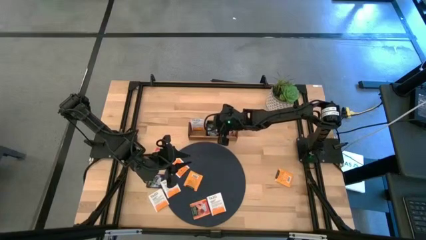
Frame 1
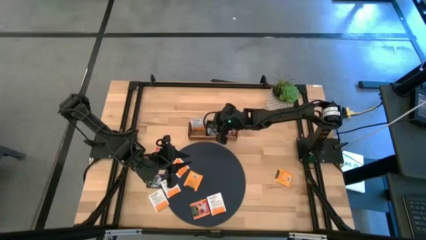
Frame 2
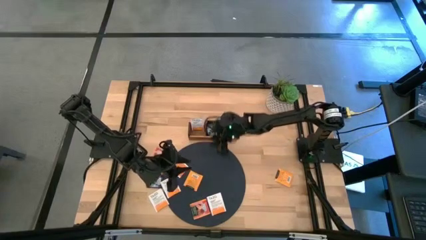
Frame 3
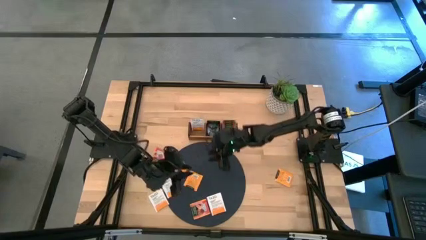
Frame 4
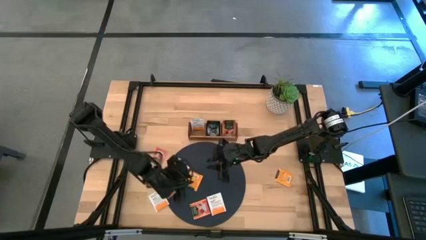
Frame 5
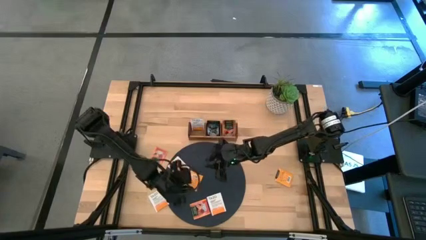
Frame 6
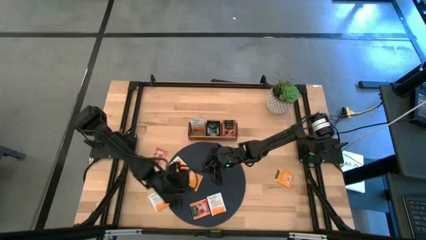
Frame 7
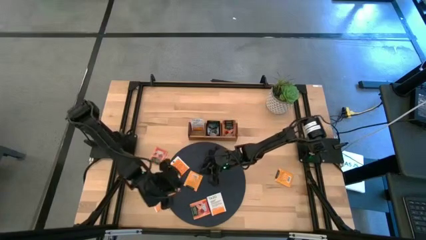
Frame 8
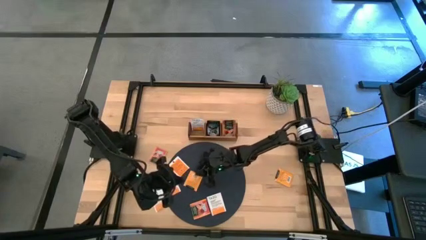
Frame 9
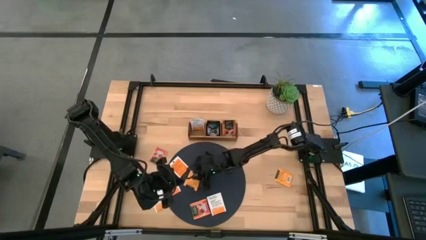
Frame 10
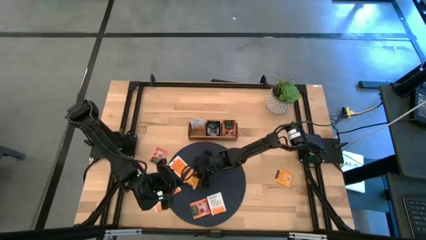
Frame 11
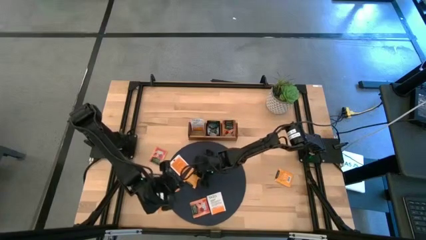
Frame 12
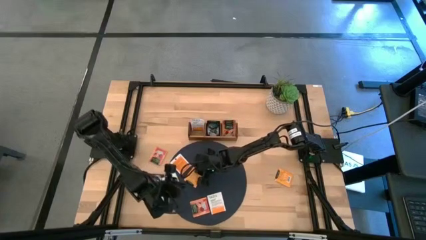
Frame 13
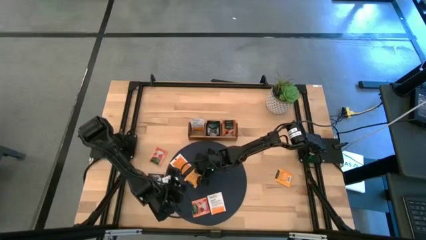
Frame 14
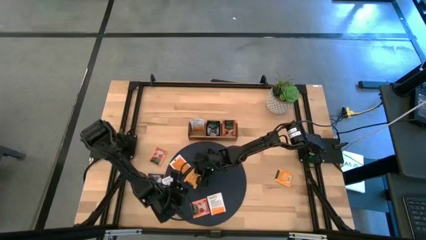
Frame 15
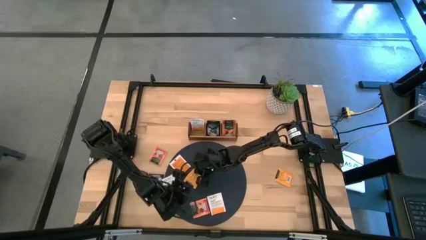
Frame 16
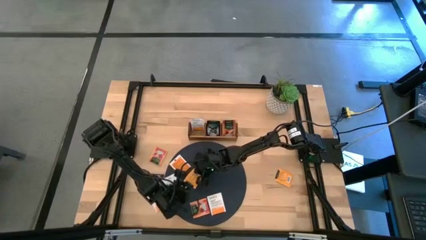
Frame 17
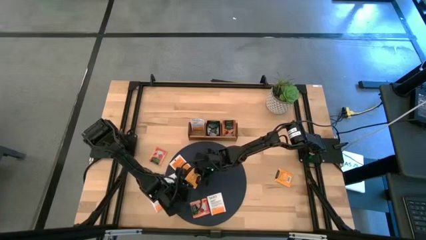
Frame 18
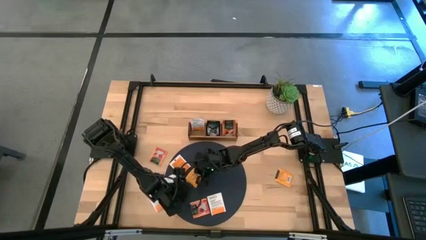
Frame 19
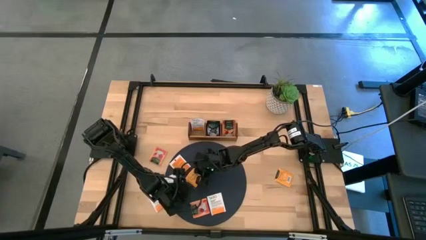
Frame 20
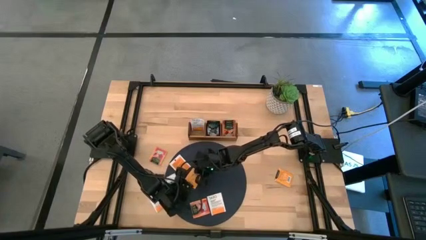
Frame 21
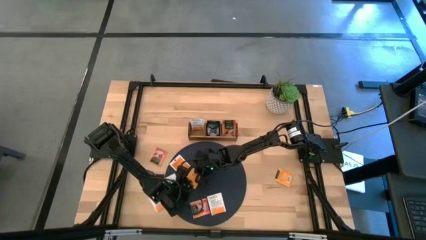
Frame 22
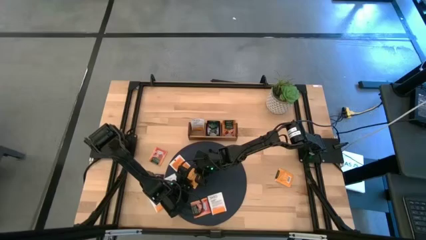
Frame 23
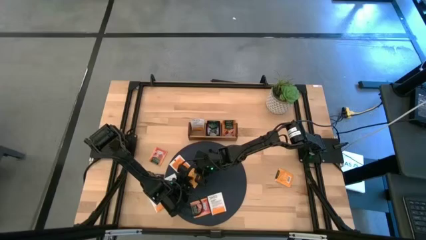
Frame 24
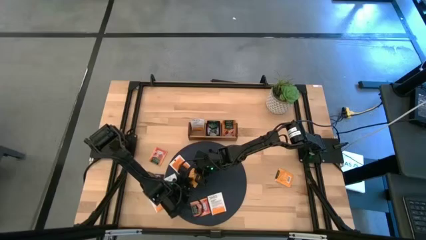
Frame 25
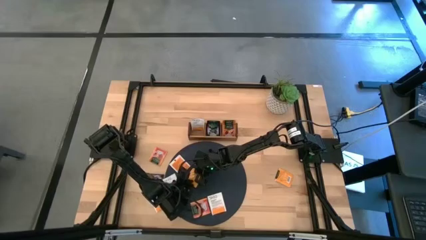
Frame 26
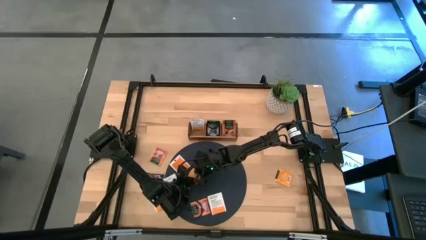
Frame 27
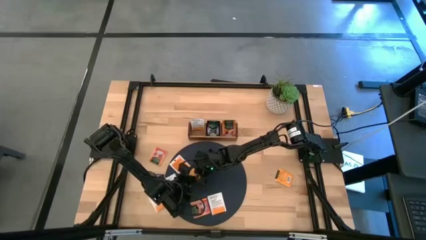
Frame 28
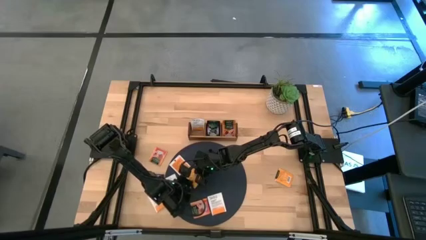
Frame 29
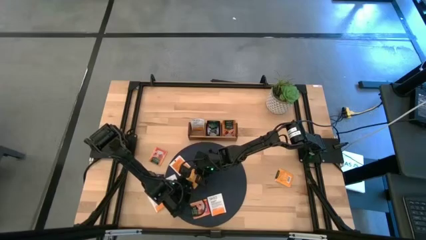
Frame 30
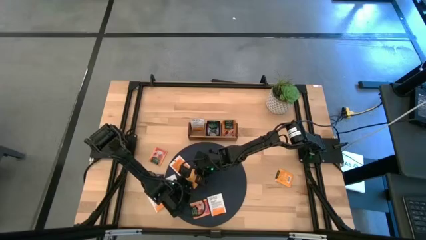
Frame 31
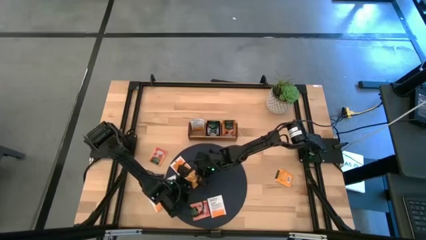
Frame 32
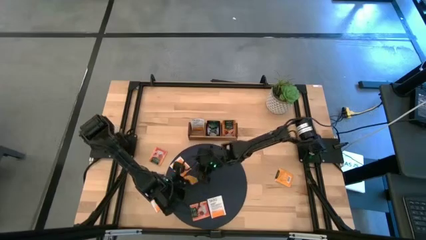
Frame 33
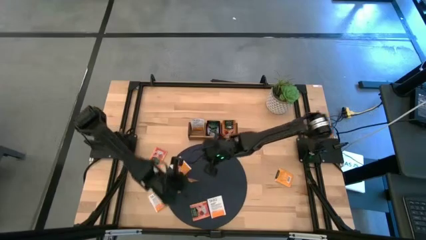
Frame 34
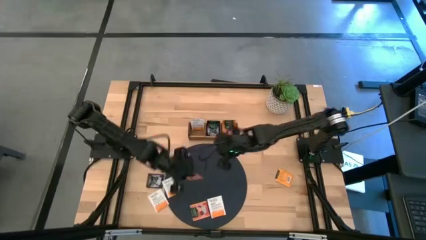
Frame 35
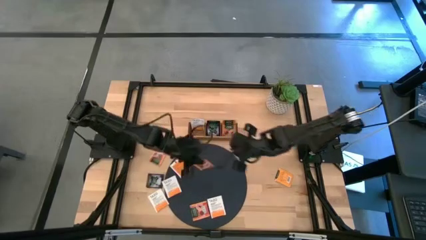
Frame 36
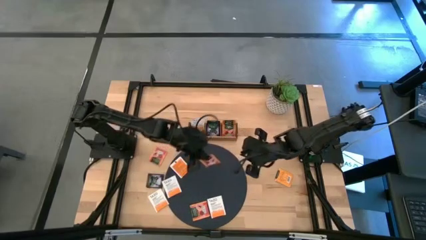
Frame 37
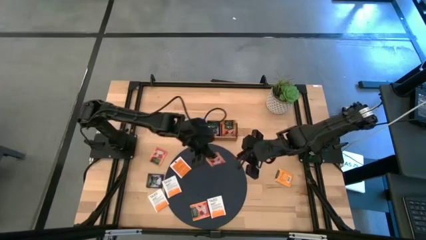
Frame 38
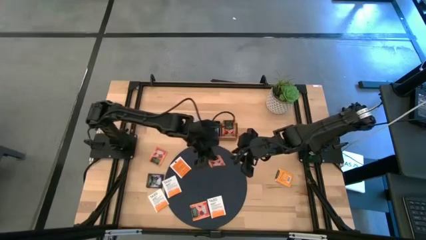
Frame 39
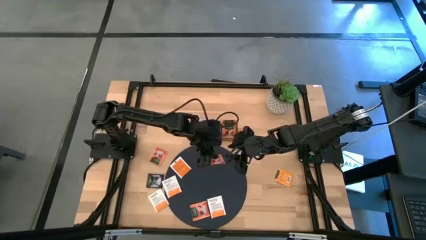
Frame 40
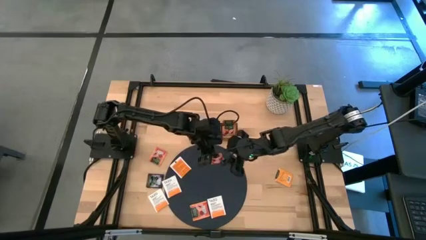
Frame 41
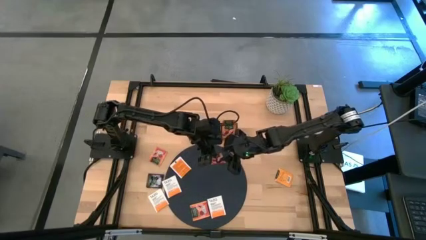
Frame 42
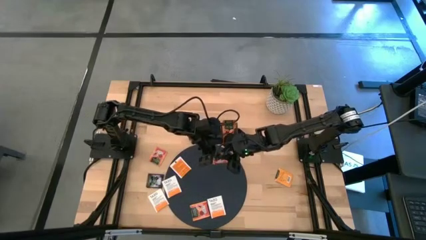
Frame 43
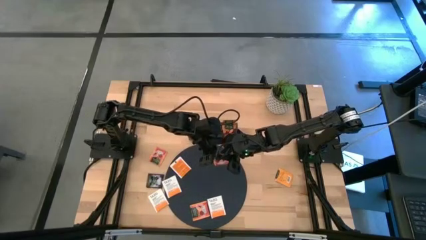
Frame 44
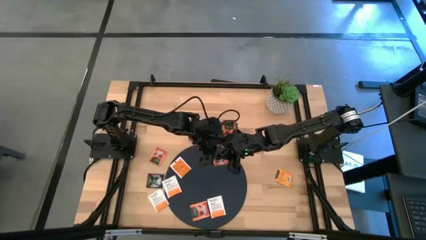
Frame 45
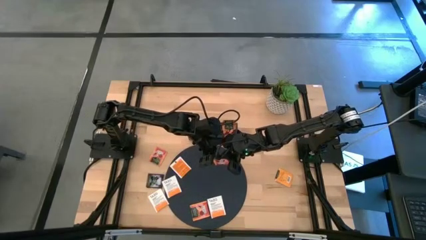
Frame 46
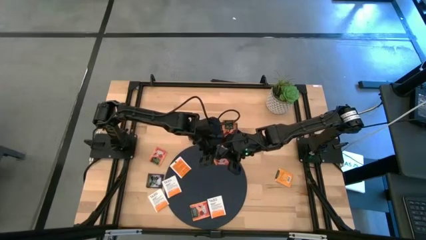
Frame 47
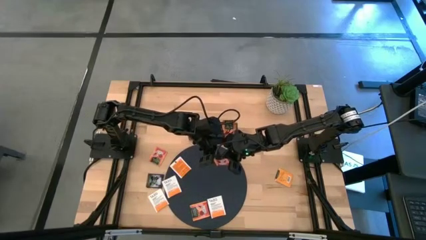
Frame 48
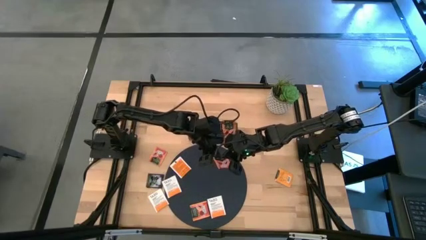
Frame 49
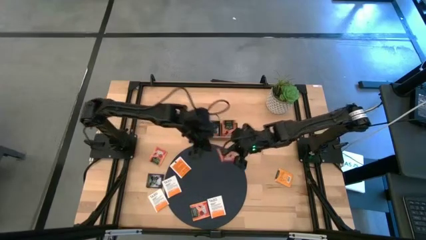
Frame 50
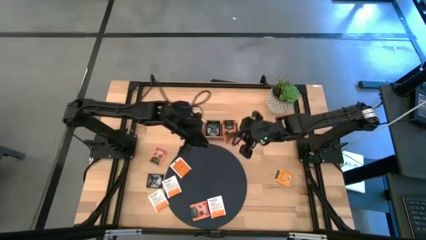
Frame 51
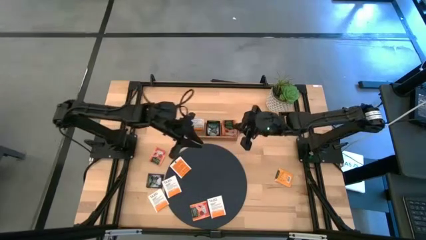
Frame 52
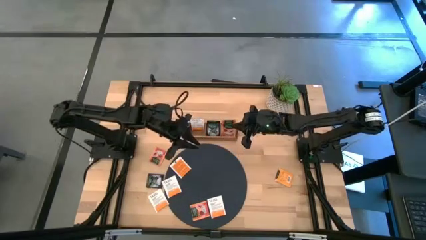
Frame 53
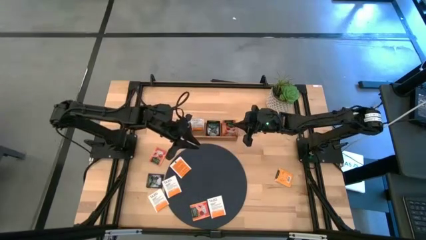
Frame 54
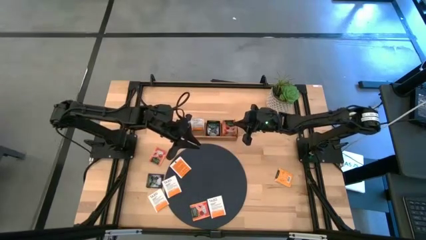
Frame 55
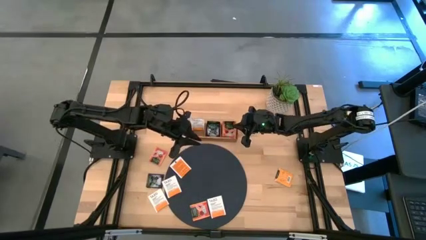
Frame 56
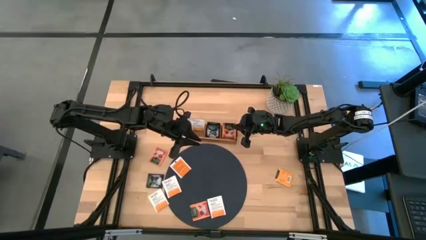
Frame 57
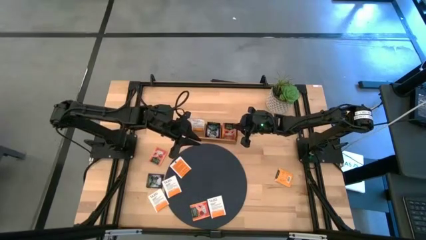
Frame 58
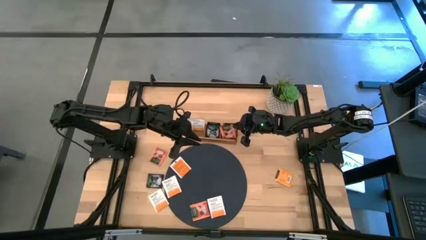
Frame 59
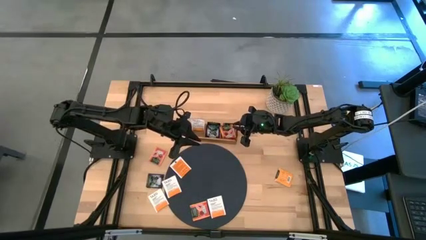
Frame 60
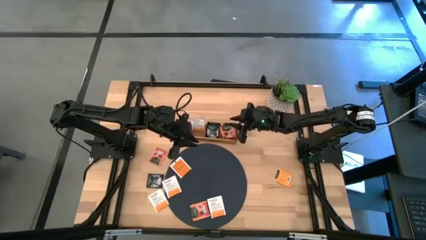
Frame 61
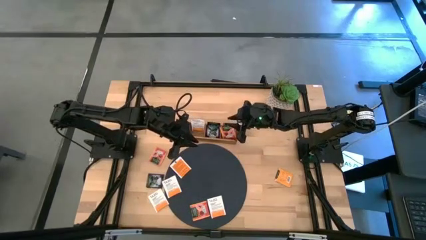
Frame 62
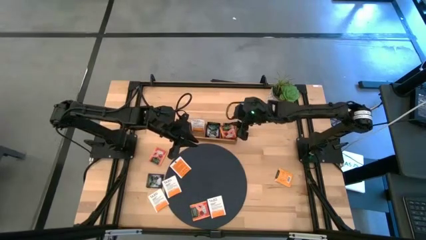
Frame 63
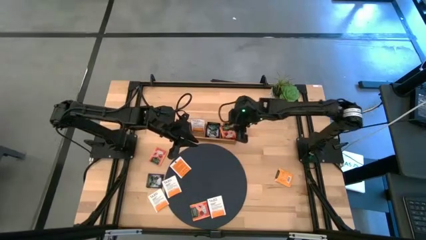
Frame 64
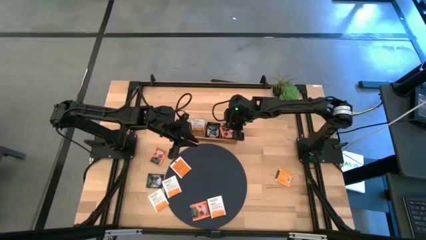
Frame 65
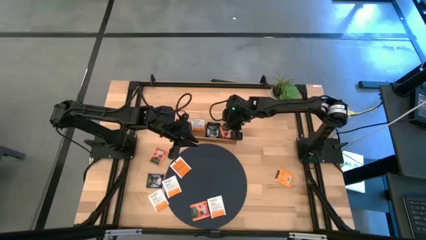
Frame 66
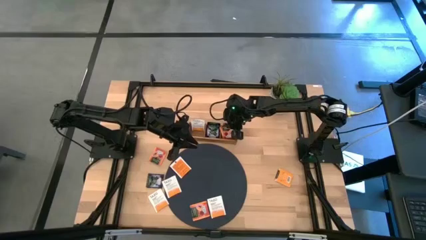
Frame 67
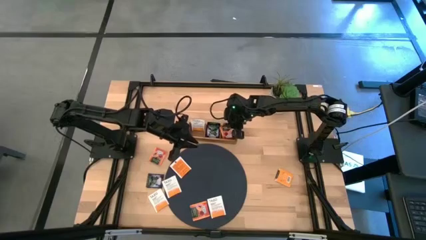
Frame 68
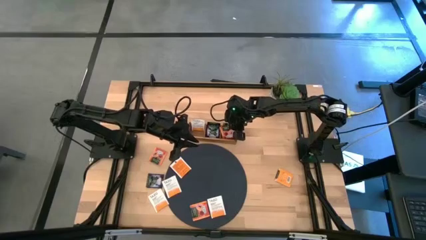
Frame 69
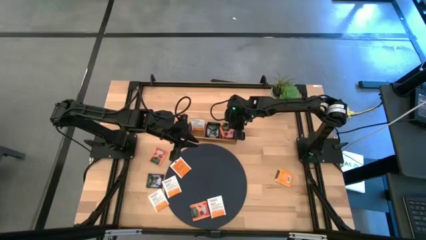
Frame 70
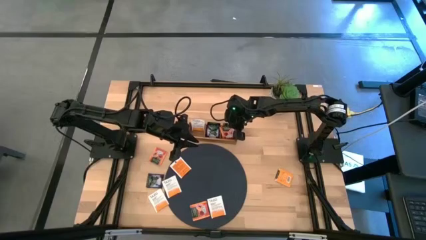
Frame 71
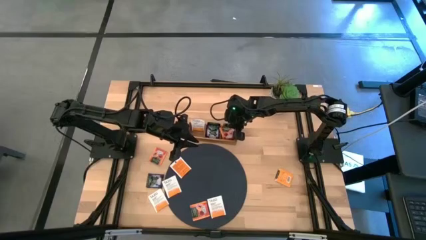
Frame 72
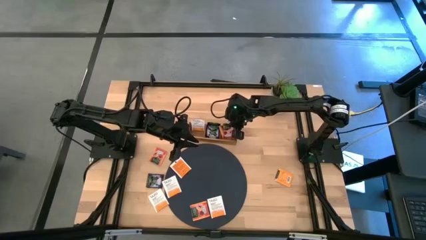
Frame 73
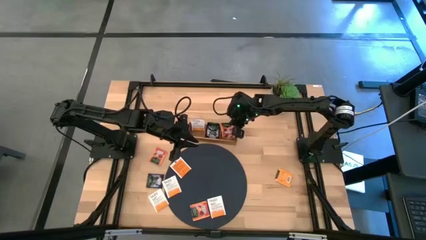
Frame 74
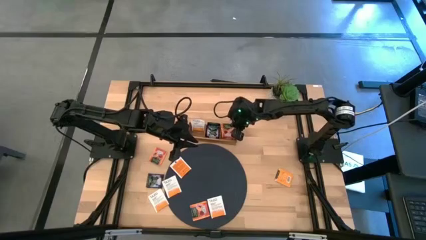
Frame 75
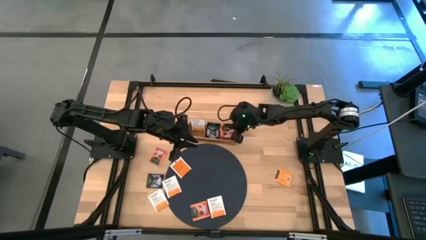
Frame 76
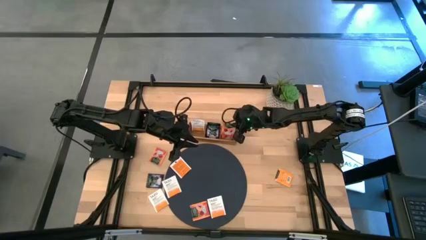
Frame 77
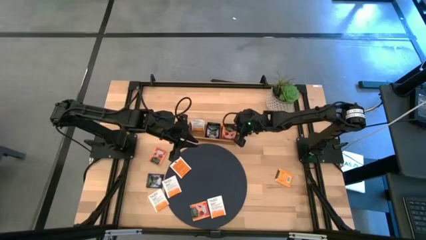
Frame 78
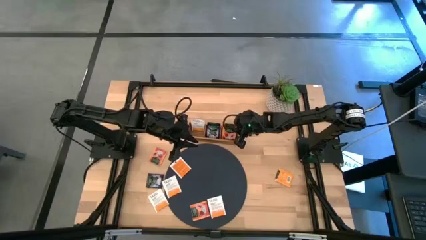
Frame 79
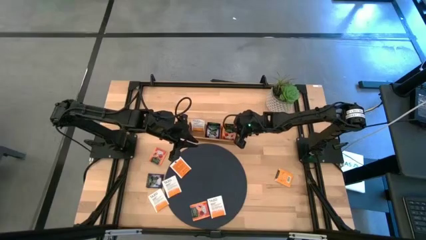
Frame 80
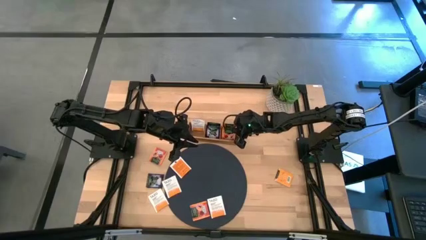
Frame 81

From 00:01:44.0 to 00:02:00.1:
Task: Pick & Place Tea
Put the orange tea bag into the right of the wooden organizer
